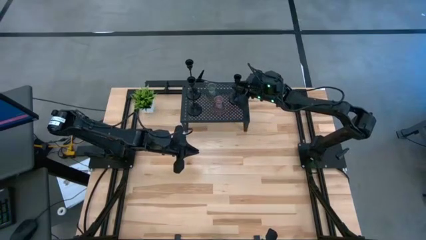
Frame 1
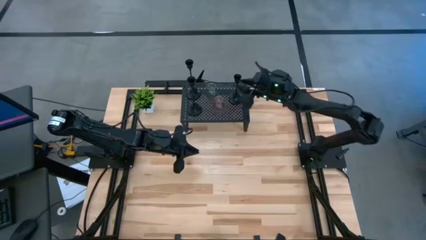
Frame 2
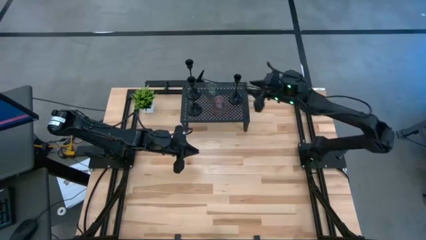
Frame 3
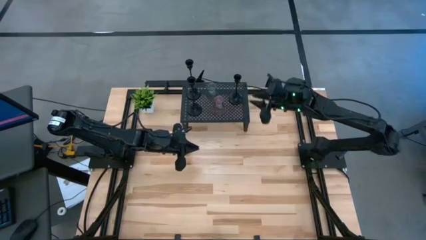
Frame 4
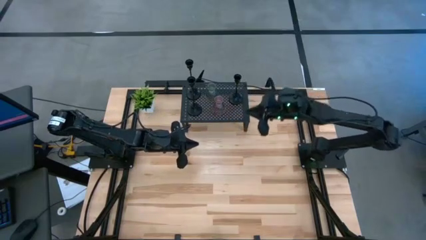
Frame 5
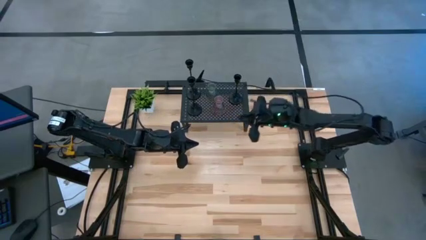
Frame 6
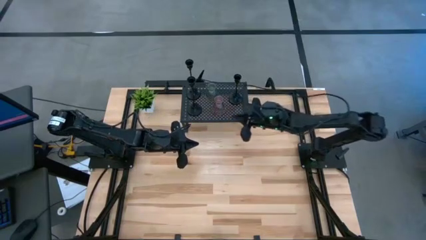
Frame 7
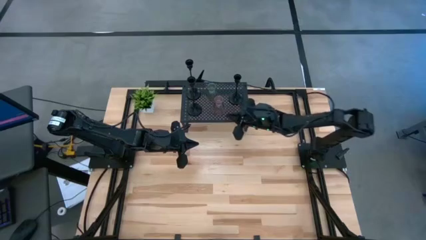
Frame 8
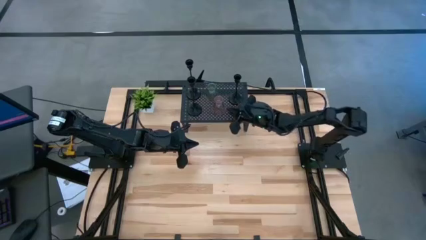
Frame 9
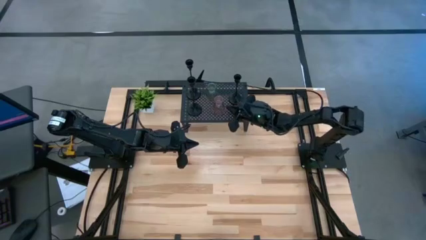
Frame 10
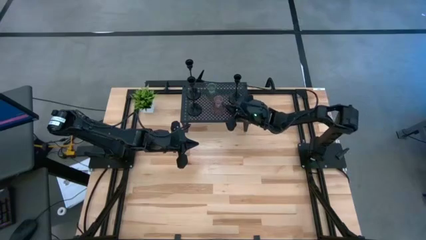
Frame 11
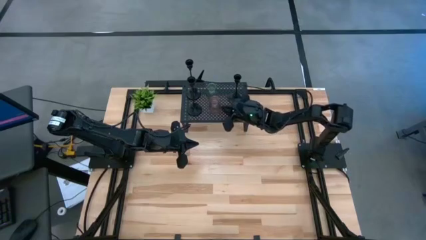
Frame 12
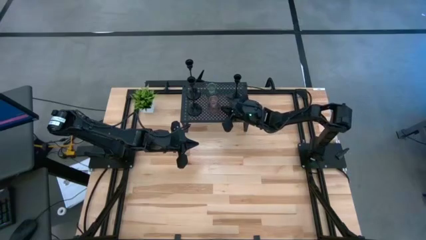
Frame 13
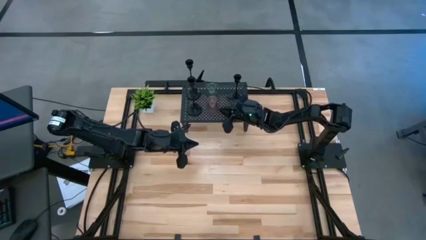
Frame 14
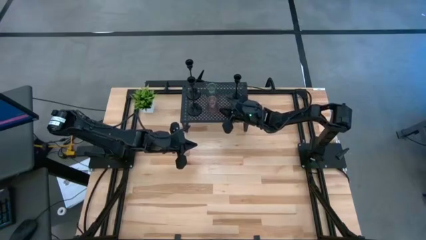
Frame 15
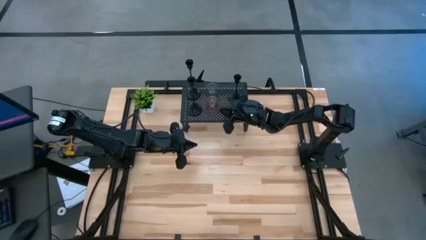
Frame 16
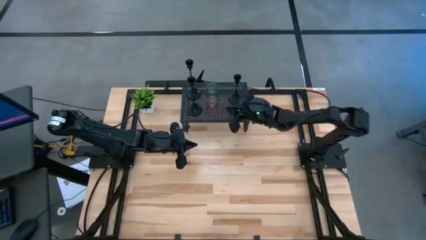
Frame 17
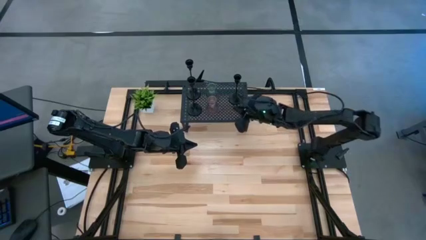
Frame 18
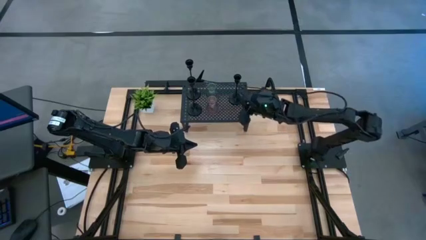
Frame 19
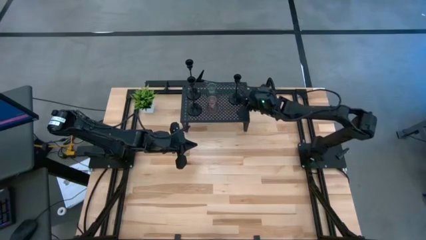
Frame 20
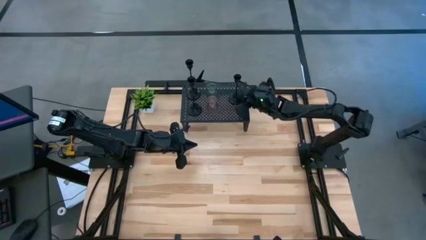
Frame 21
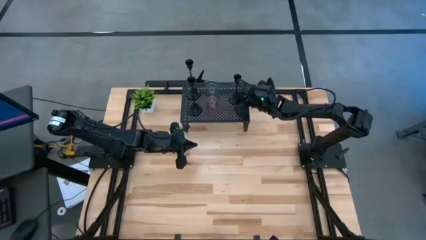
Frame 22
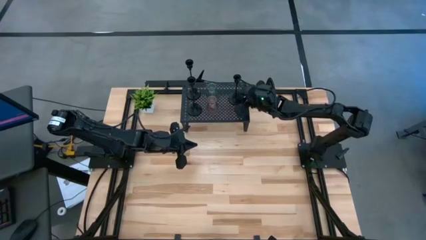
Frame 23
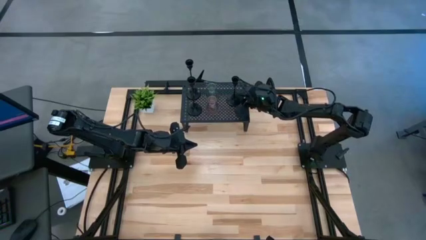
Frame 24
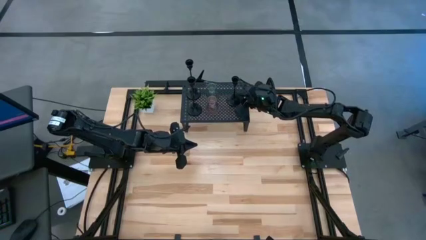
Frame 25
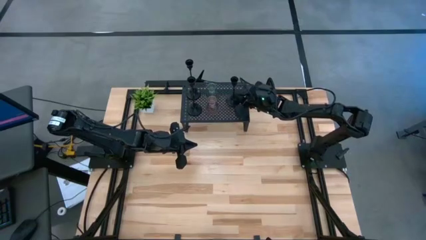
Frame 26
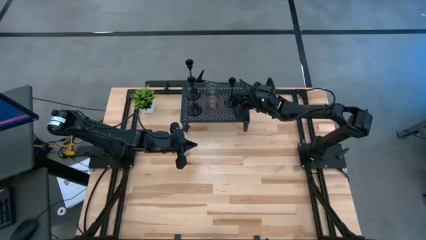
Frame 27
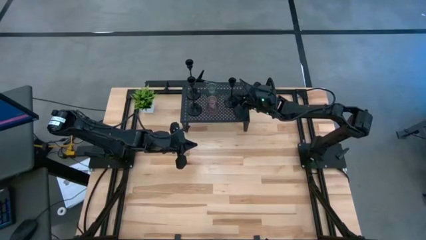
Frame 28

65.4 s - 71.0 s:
Task: Pick & Place candle stick holders
Adjust the candle holders on the shelf

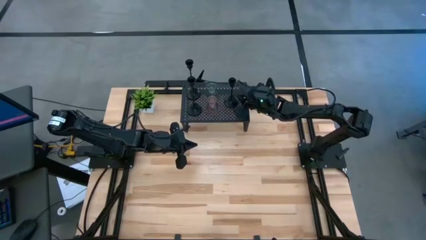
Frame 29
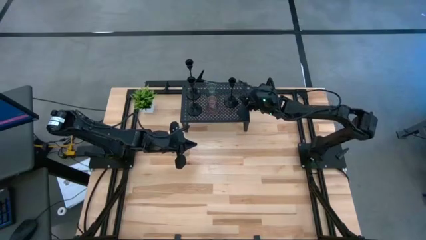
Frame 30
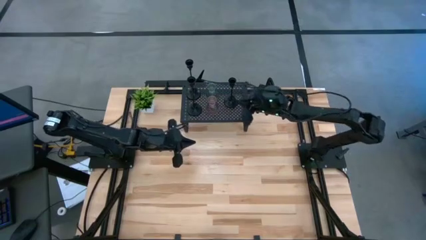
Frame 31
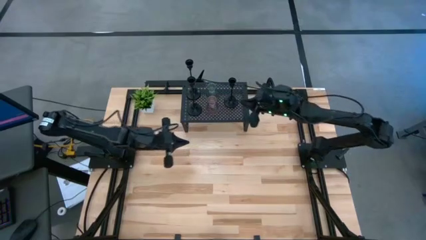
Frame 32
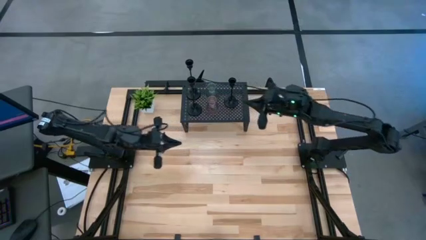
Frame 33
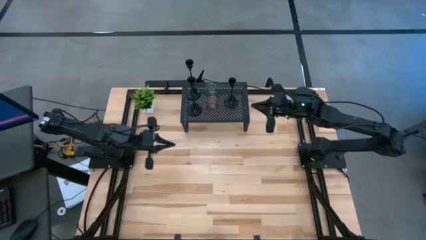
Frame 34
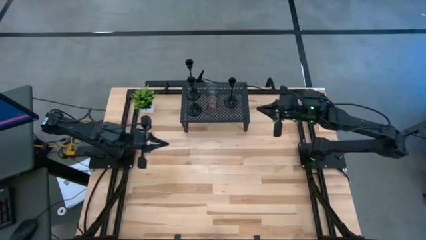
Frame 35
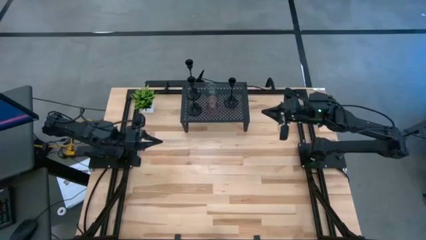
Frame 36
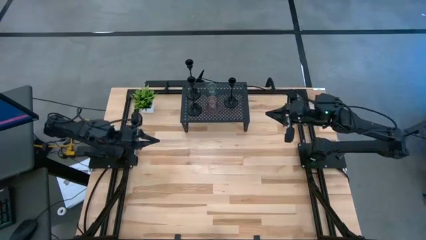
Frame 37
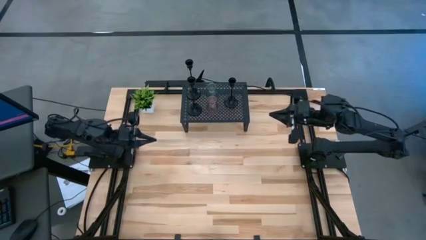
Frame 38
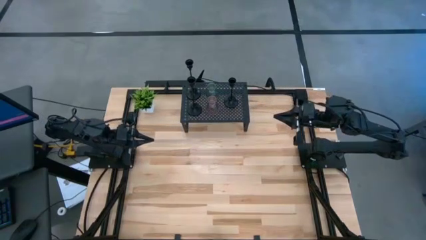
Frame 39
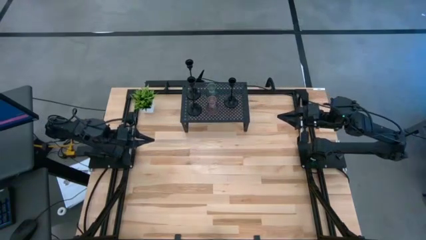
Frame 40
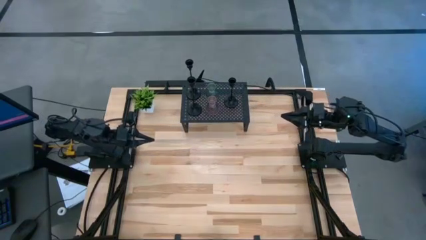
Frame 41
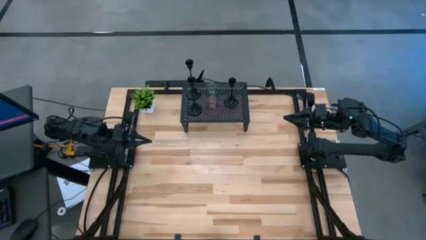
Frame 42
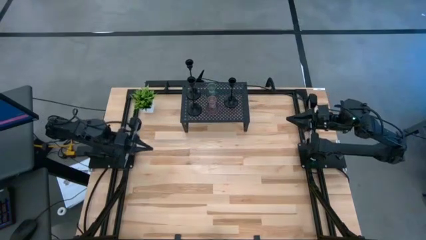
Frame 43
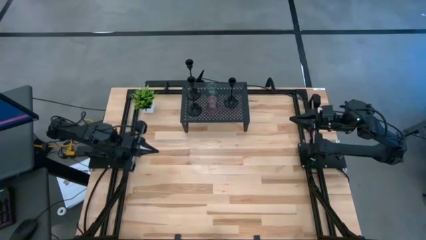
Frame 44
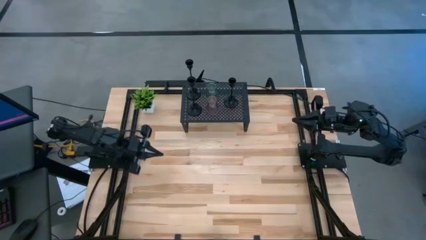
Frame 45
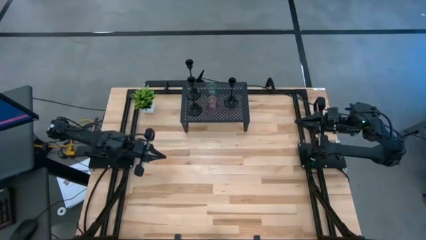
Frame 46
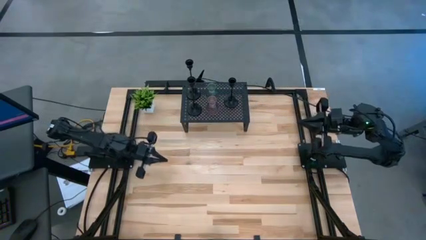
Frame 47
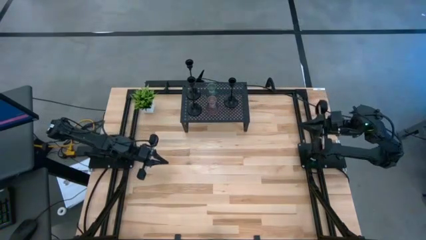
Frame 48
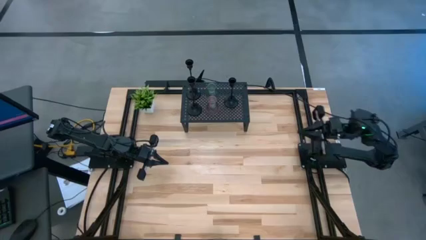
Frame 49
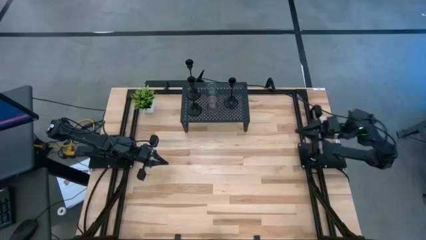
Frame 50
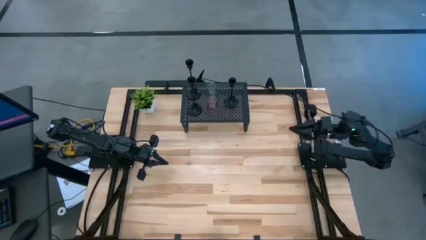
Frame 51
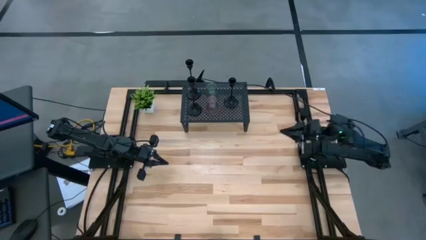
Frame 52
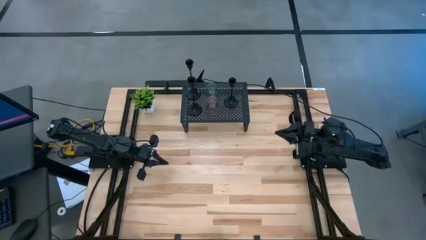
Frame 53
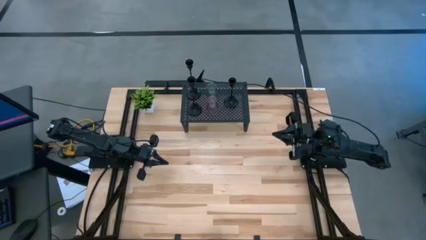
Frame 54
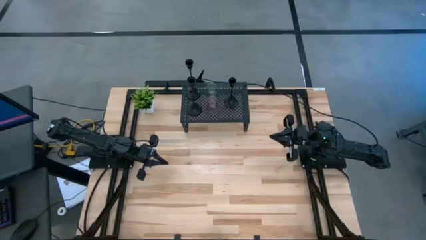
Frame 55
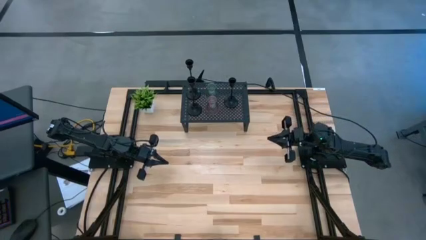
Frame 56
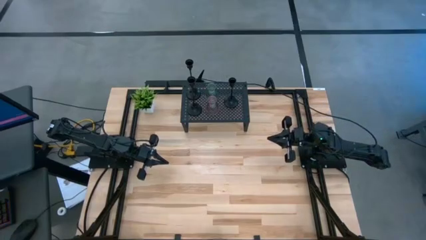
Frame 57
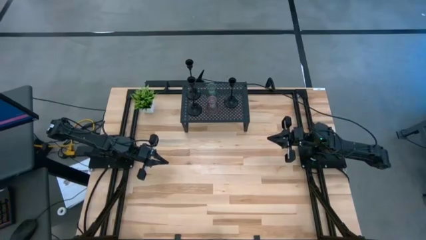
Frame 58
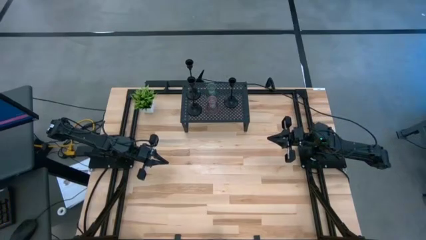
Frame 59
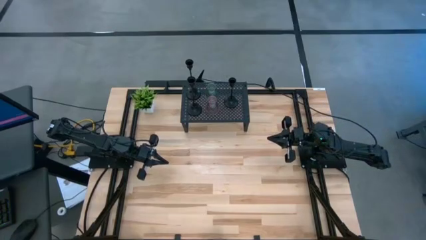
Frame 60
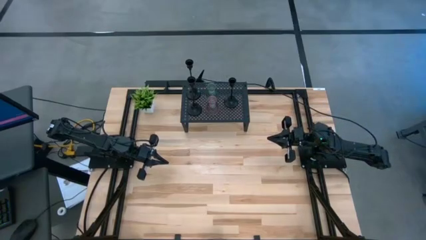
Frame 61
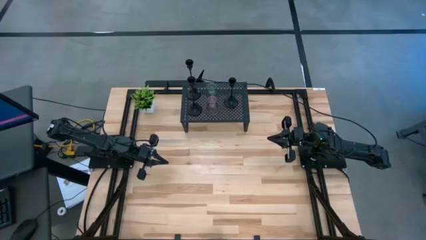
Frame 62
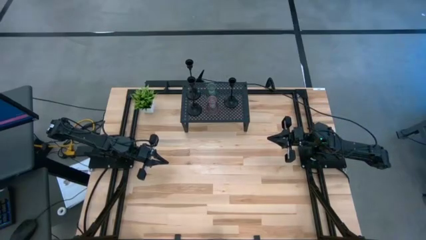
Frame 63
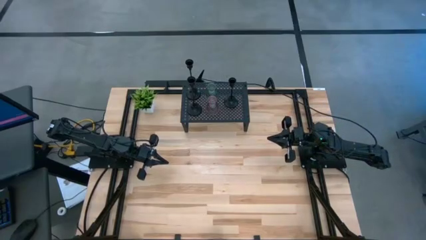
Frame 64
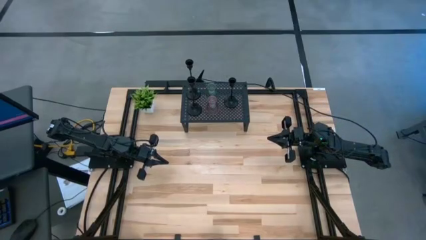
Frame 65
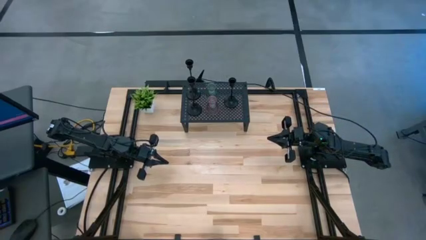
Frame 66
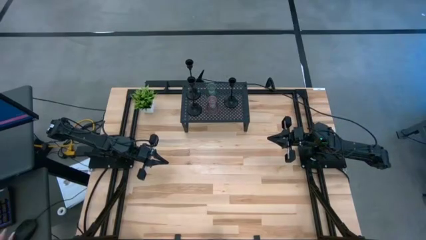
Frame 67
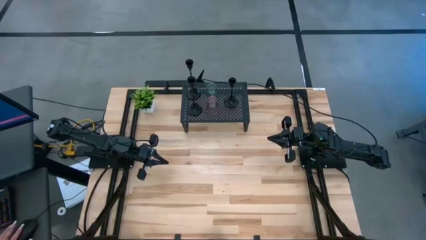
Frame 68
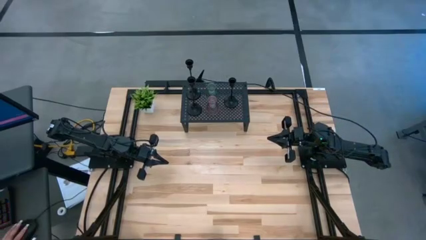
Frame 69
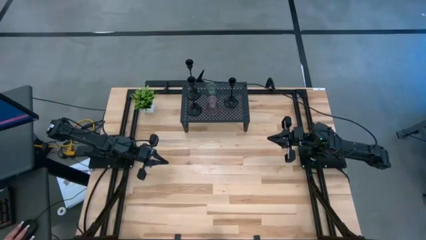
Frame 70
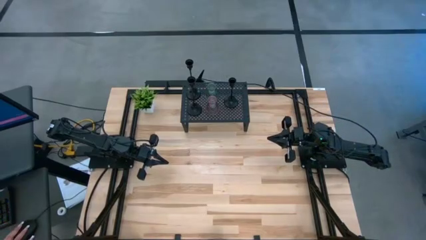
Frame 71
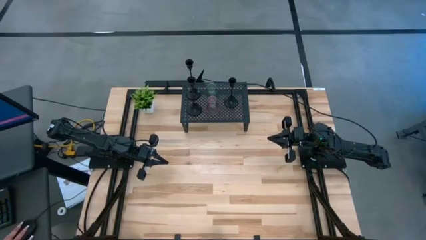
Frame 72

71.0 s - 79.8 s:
Return to Home Position
